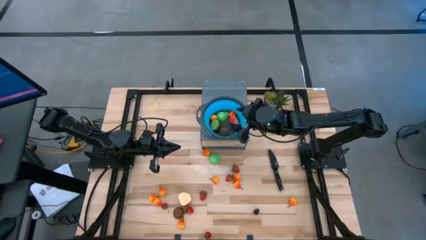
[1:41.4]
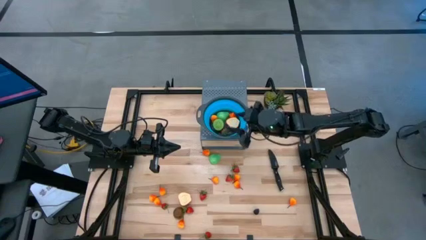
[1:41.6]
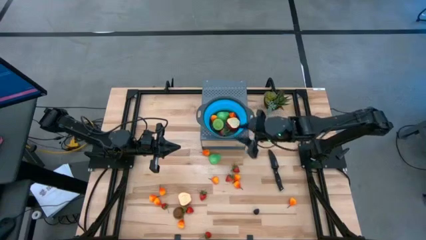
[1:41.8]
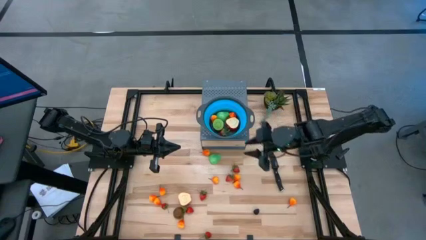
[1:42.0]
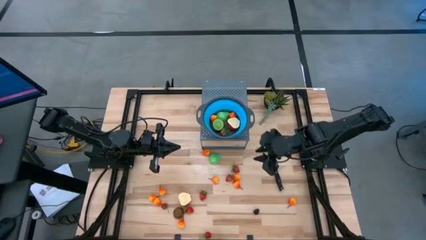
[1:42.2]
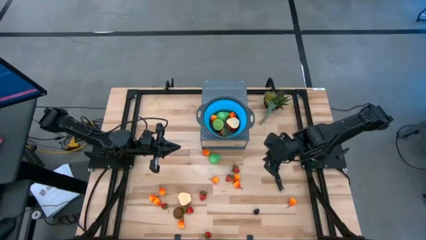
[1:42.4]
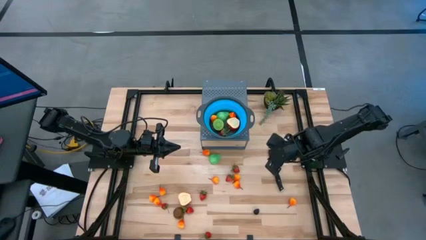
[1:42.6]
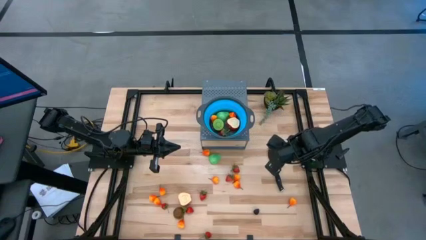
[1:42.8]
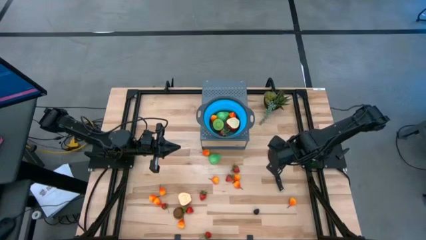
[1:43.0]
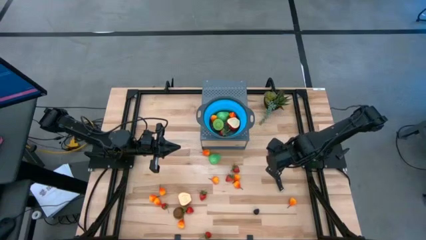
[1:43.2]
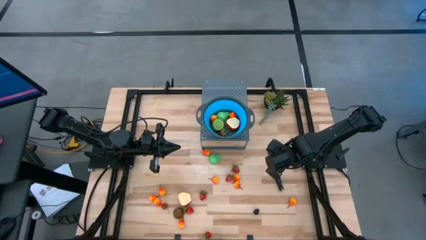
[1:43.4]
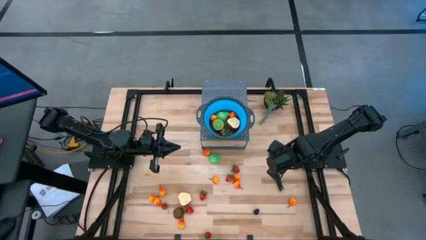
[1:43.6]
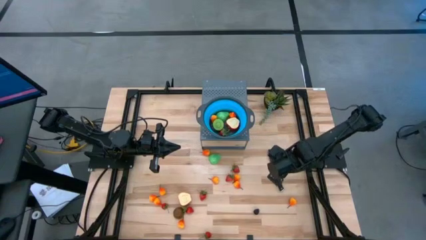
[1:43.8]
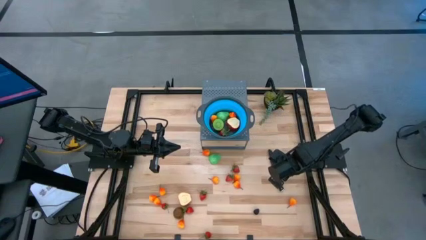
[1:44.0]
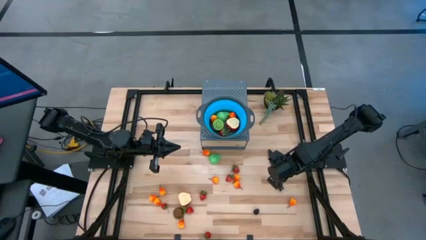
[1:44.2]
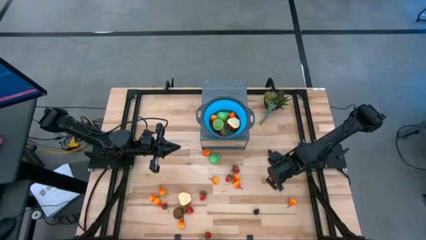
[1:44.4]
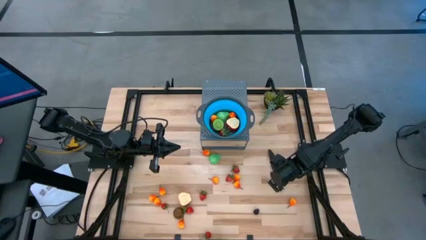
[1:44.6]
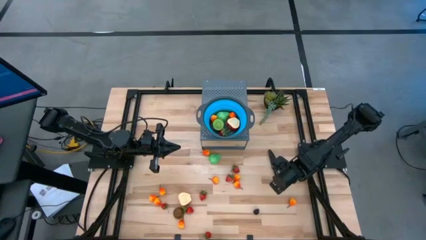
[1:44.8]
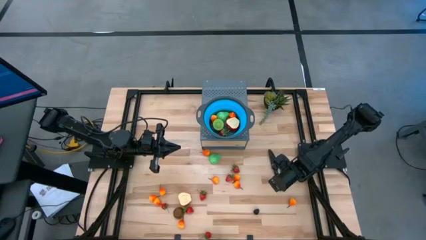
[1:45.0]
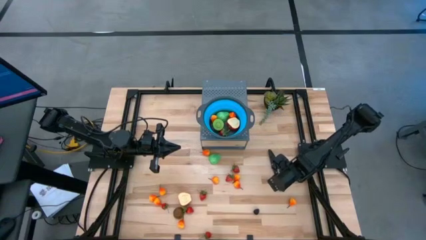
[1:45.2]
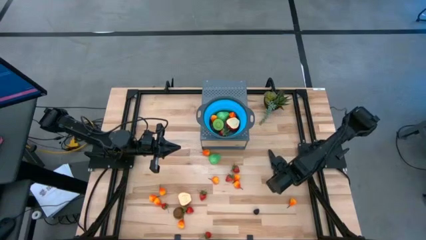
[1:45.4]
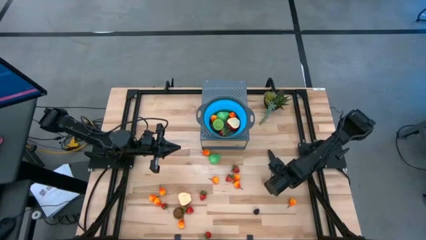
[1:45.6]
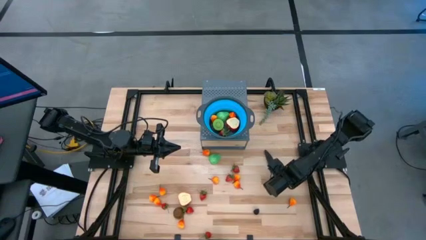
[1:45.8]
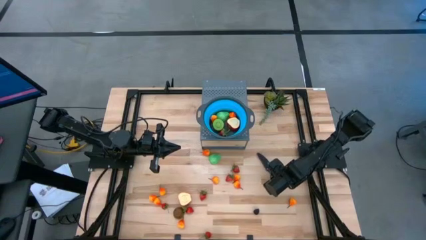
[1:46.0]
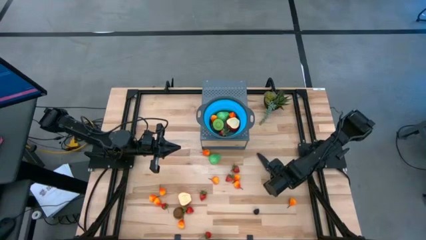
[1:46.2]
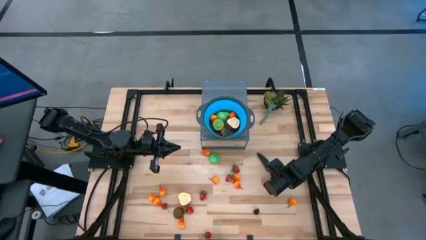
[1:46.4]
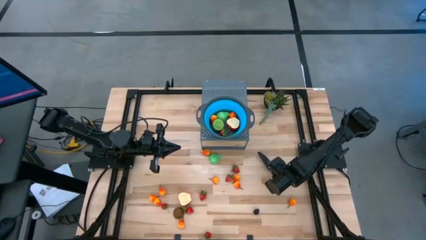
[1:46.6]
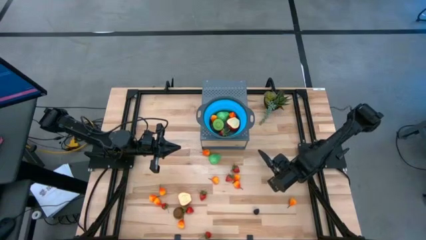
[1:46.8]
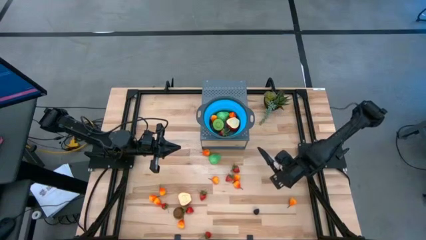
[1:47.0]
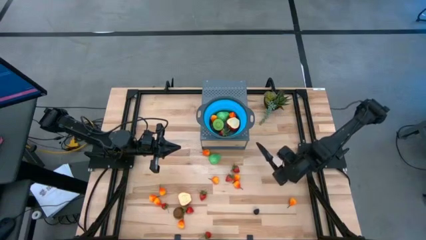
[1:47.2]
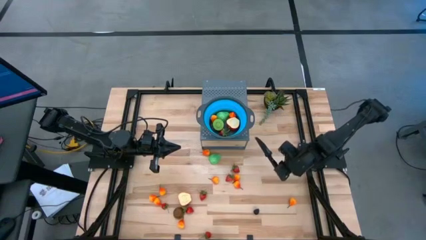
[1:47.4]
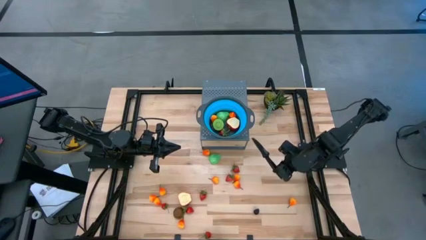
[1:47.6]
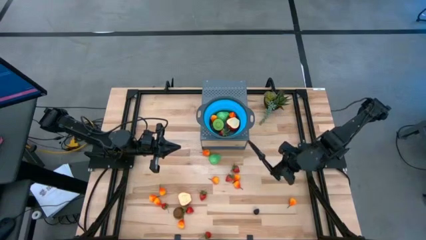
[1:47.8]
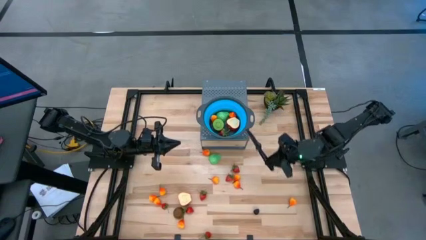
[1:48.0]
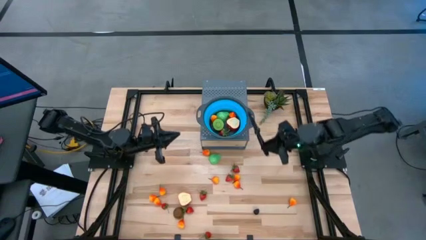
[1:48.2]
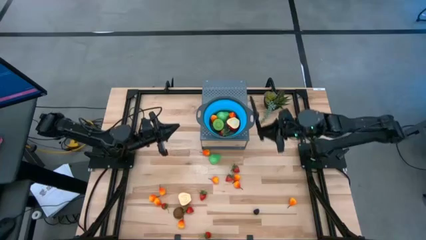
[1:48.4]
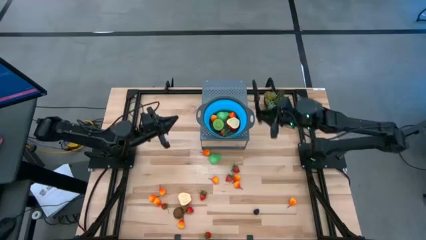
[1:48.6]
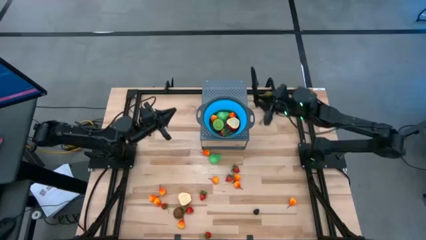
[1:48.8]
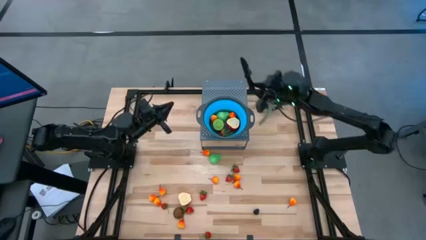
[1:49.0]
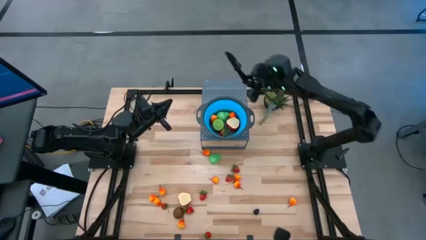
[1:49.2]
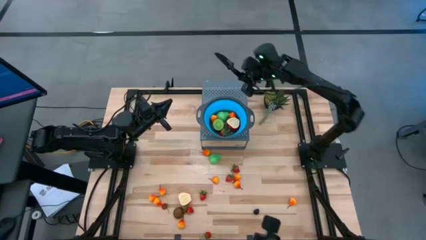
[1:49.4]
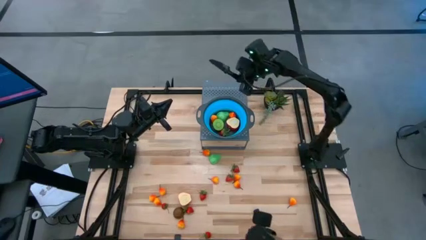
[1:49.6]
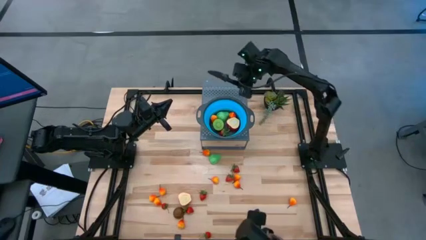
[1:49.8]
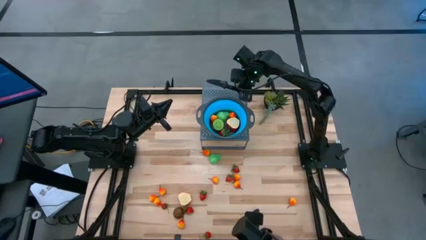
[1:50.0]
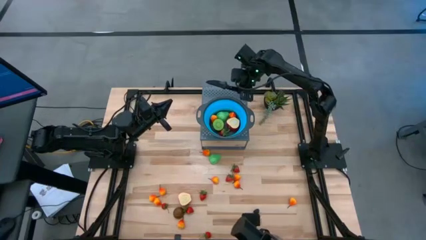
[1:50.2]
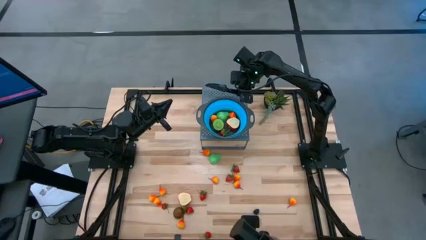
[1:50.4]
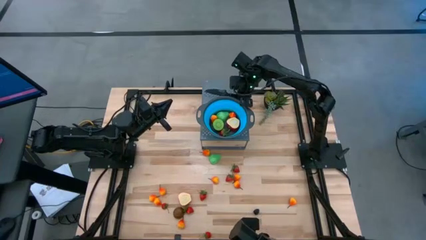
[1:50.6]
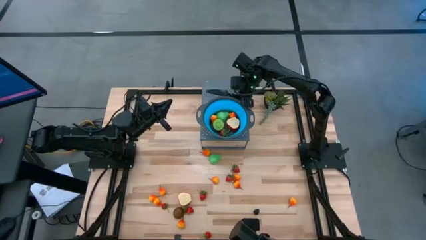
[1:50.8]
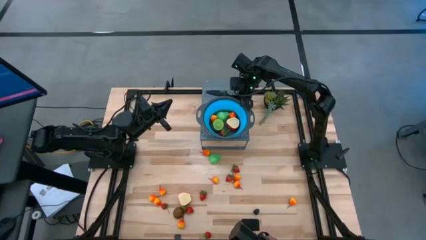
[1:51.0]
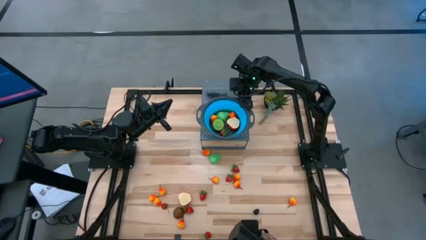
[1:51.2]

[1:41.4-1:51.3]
Task: Pick & Place Fruit
Put the knife on the shelf

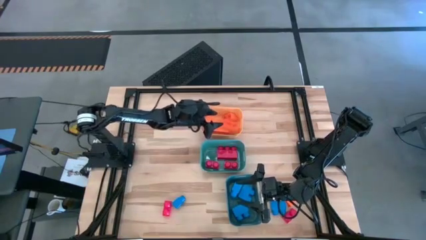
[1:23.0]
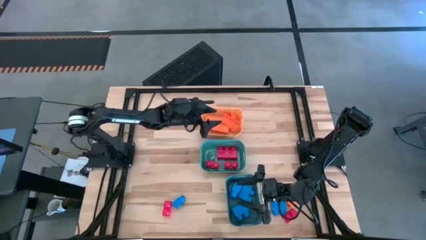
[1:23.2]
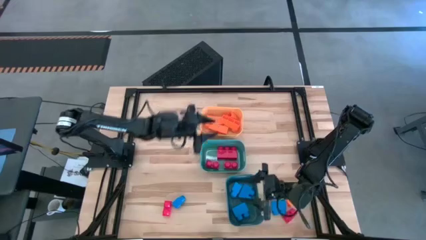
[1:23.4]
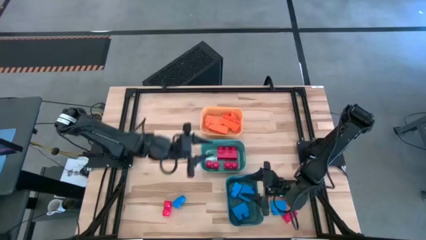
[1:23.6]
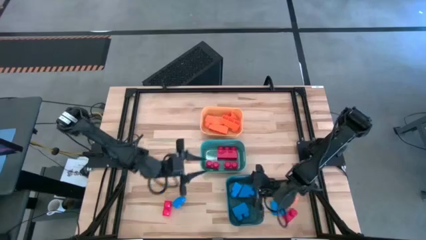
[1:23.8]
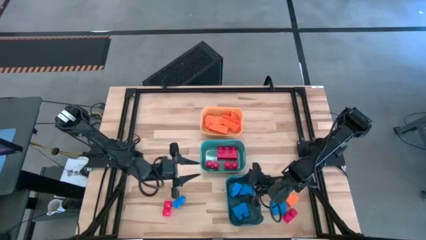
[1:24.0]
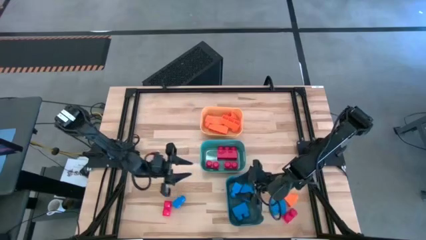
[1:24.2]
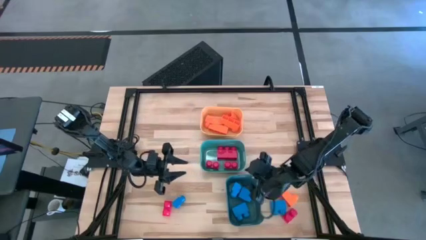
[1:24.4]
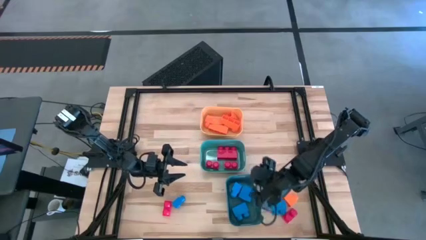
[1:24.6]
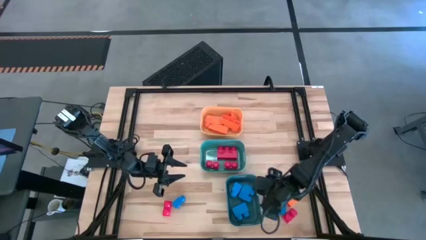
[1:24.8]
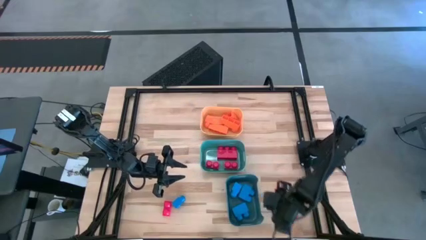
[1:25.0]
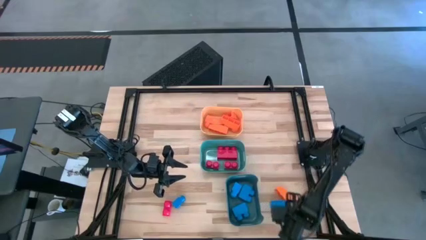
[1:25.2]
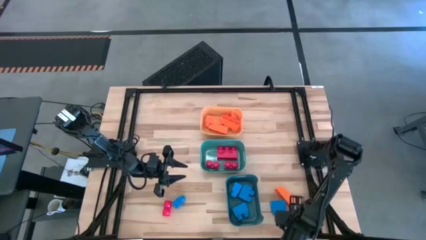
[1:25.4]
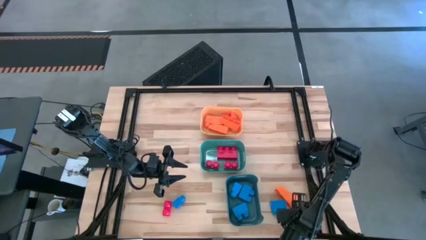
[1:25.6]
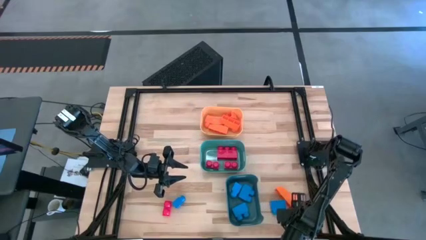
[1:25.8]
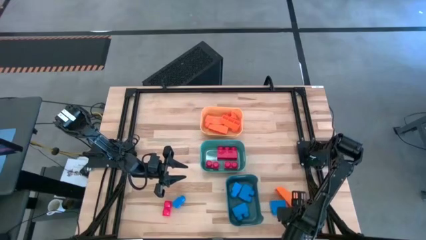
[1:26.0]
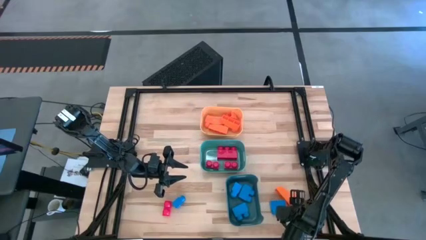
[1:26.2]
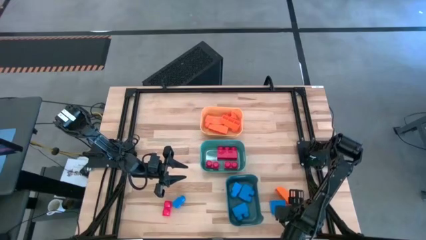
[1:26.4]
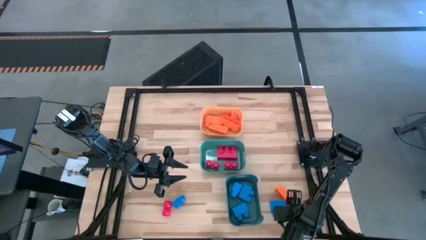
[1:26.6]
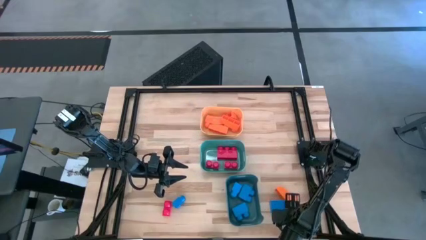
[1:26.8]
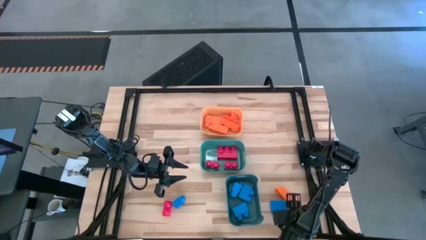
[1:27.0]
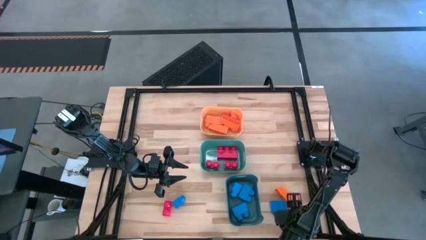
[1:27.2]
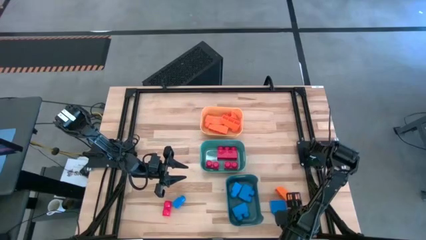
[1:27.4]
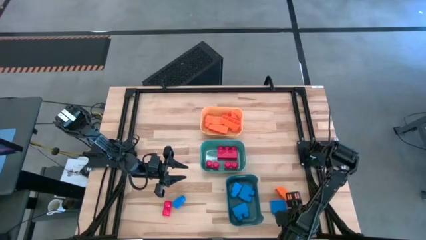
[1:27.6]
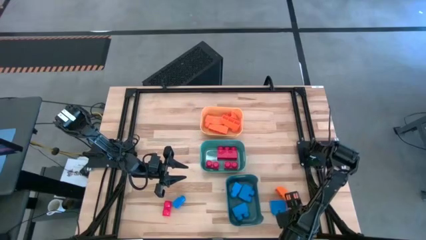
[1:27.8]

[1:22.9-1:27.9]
Task: Sort & place blocks by color
Put the red game piece into the green bin

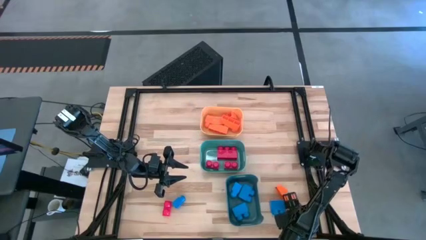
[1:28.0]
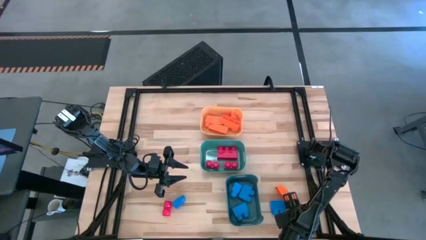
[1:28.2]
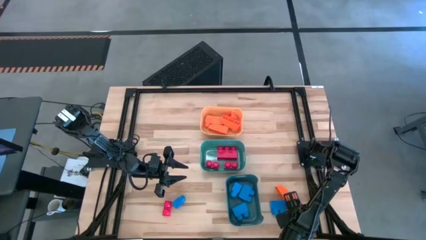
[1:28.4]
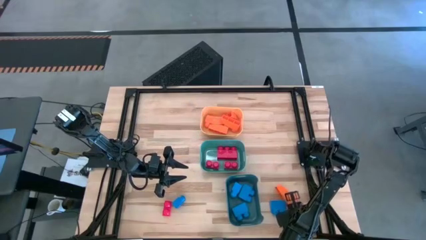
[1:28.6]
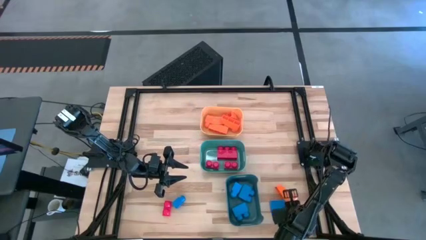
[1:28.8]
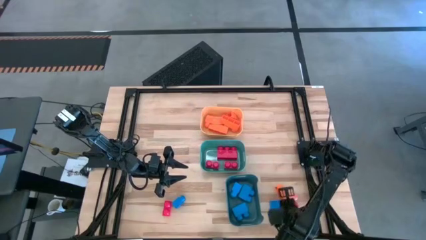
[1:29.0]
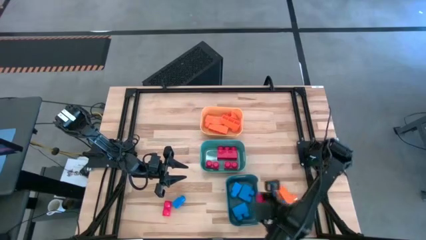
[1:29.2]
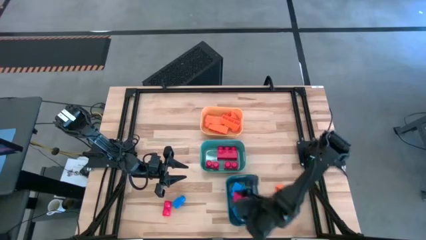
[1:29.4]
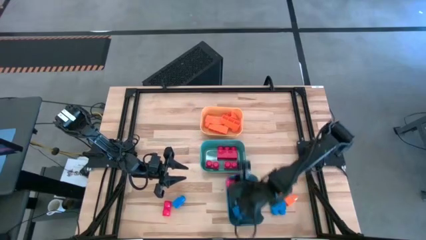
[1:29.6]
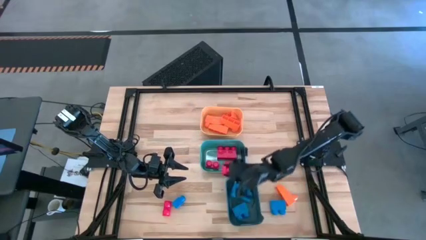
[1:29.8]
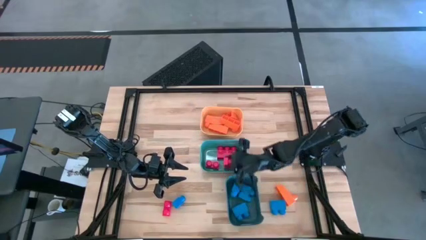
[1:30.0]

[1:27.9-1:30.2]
Put the red game piece into the green bin
